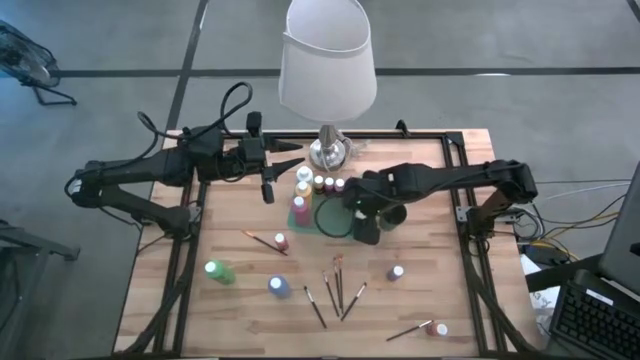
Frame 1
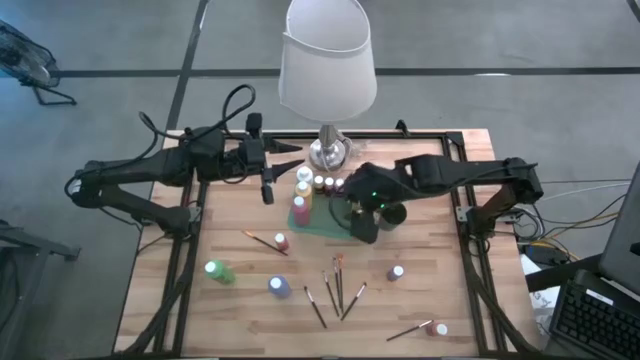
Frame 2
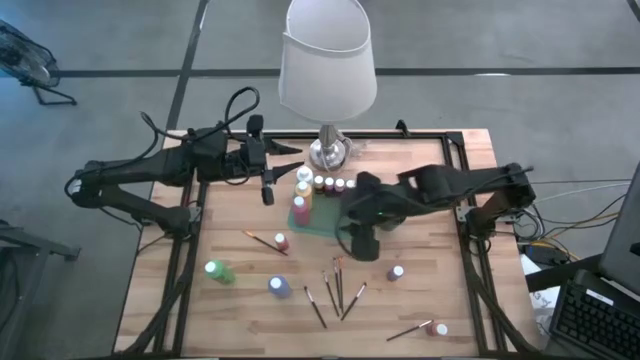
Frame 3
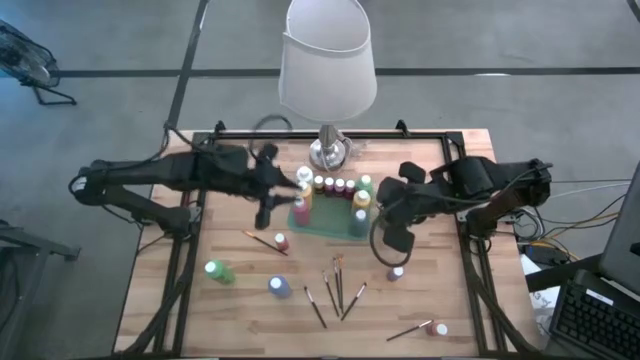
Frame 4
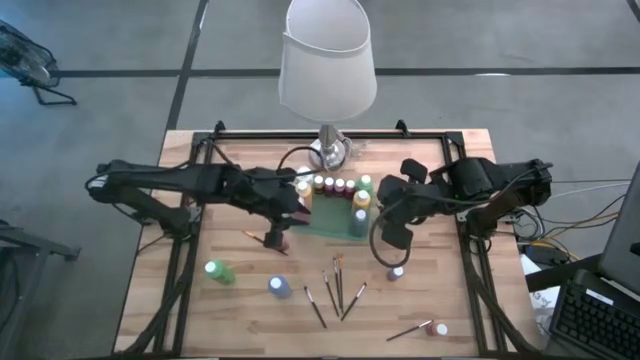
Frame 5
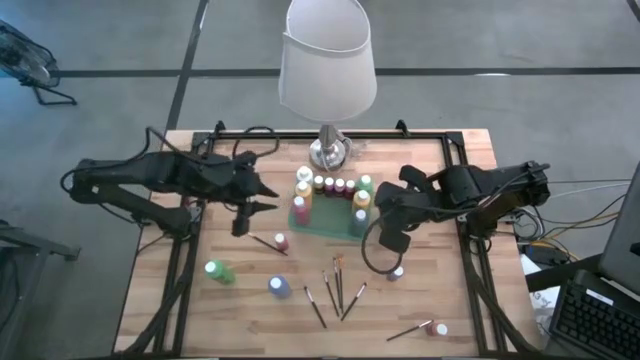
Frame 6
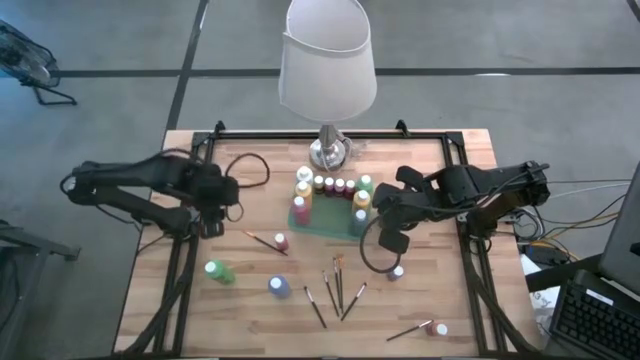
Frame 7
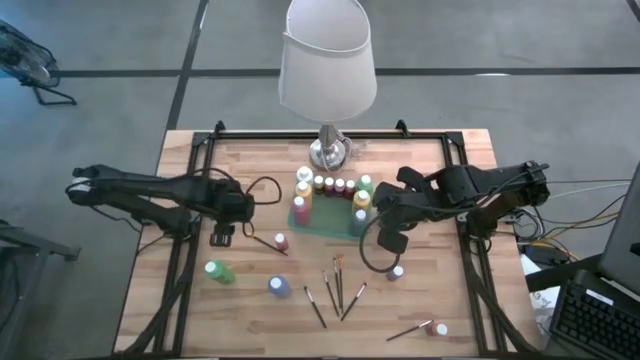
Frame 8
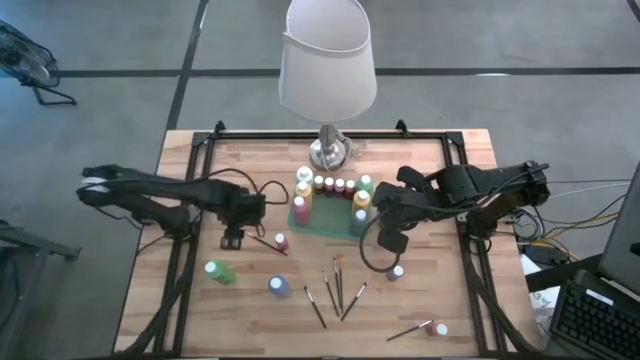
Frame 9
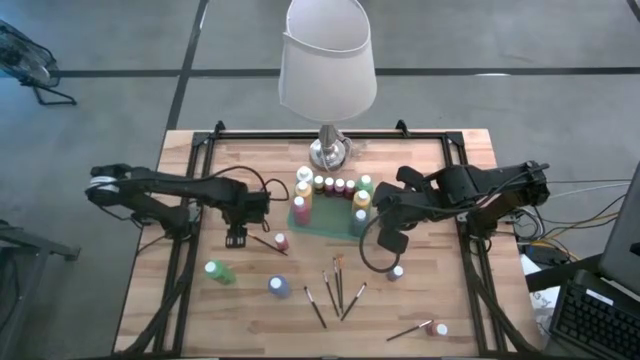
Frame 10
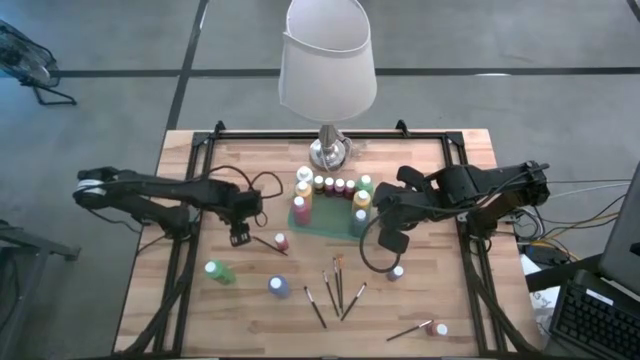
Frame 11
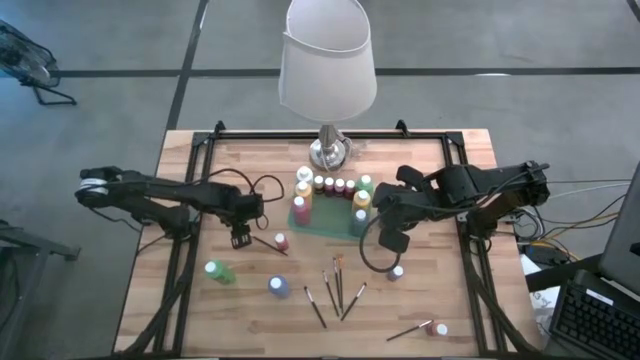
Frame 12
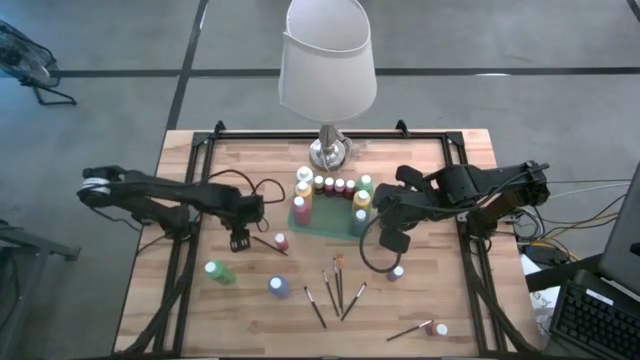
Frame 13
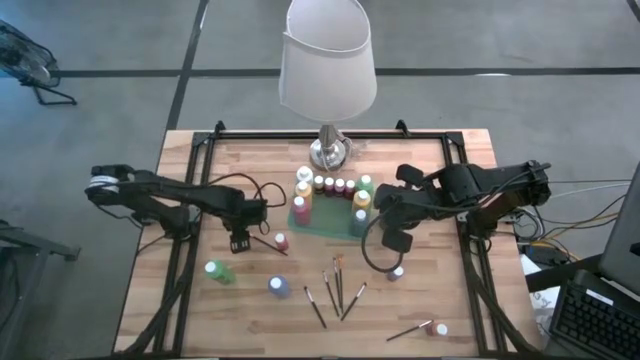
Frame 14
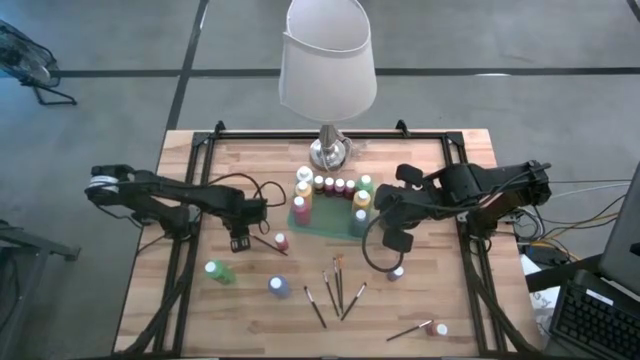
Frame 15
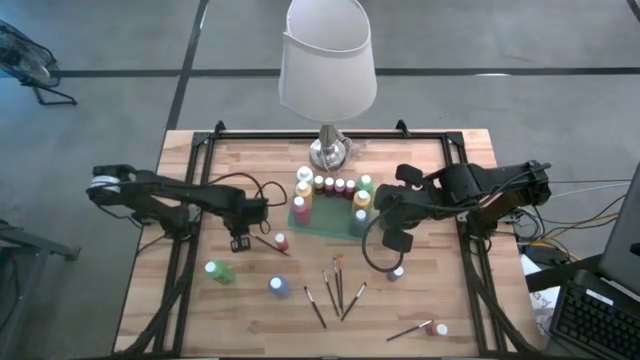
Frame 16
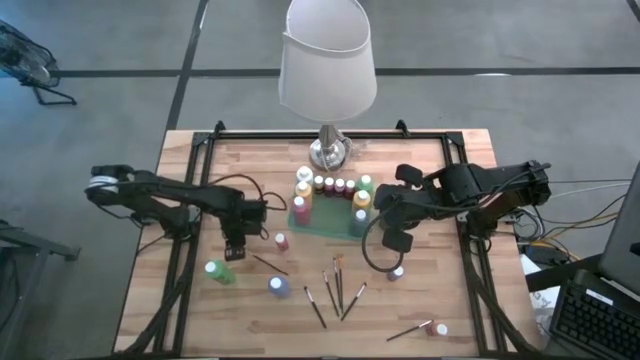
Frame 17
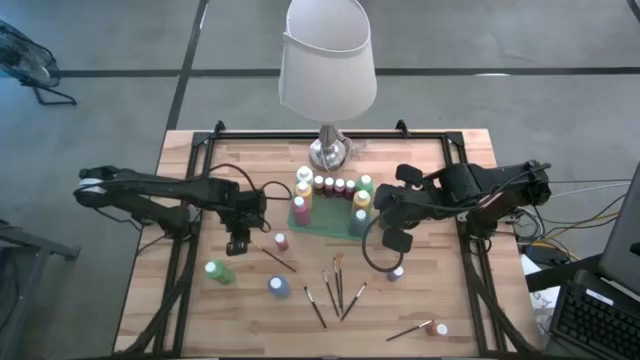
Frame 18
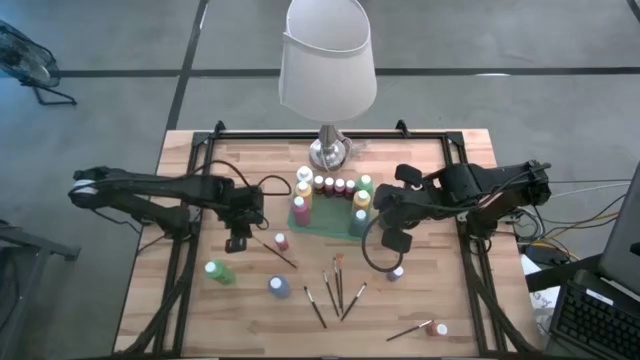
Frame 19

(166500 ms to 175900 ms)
Task: Pick & Place Paint Supplies
Put the orange paint brush into the black cup

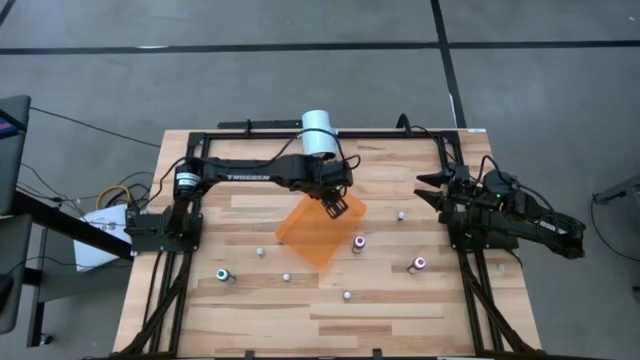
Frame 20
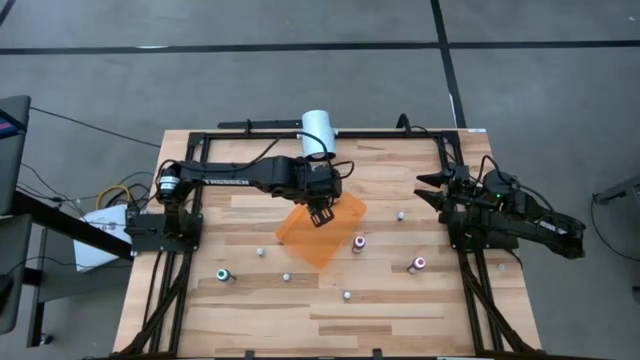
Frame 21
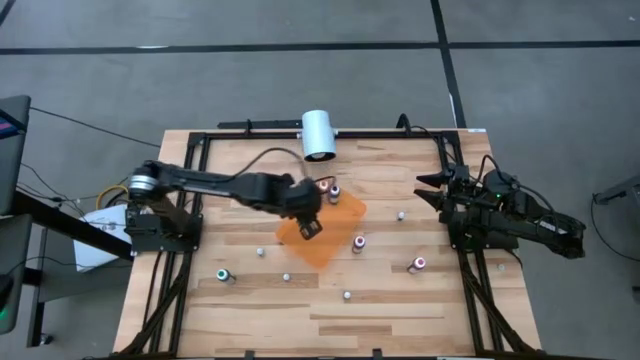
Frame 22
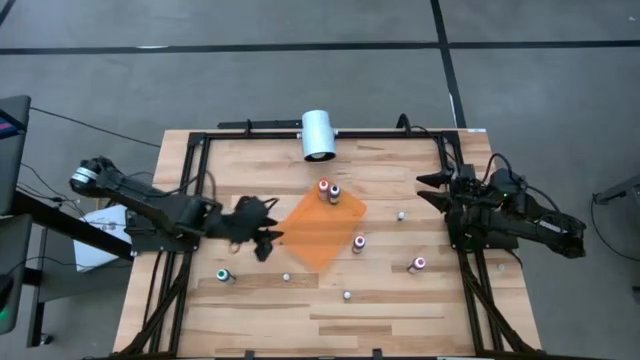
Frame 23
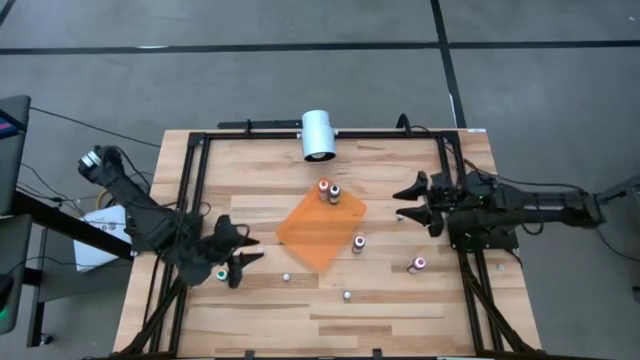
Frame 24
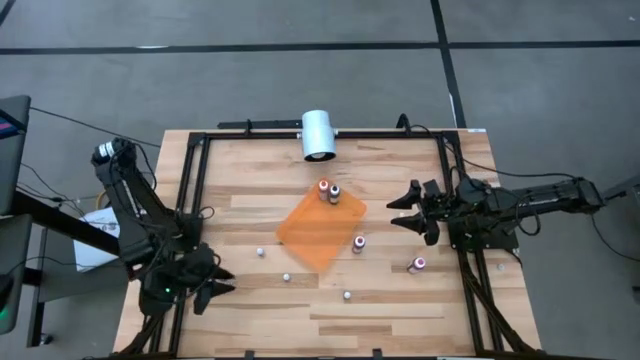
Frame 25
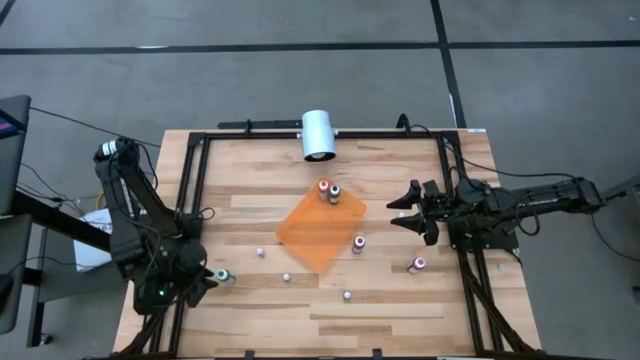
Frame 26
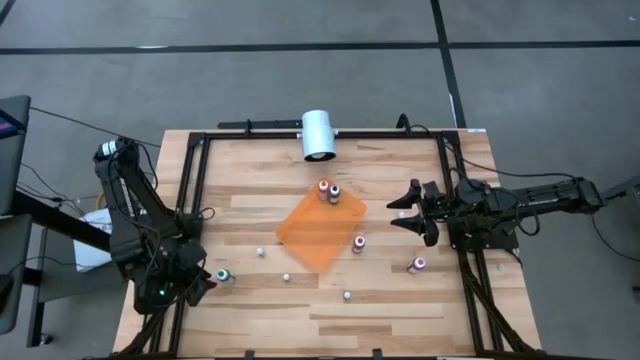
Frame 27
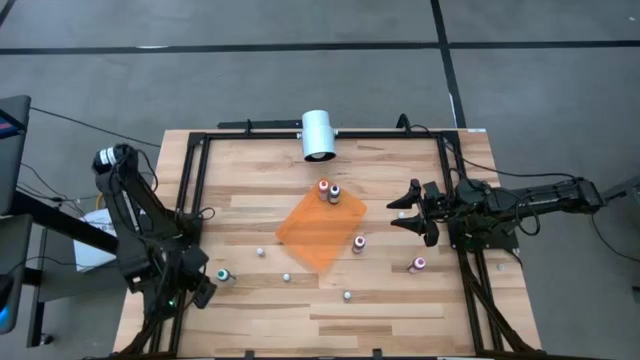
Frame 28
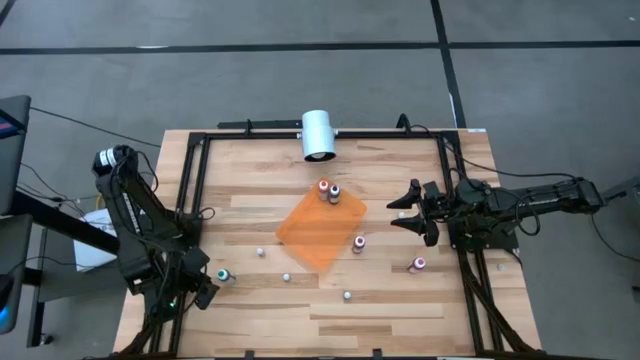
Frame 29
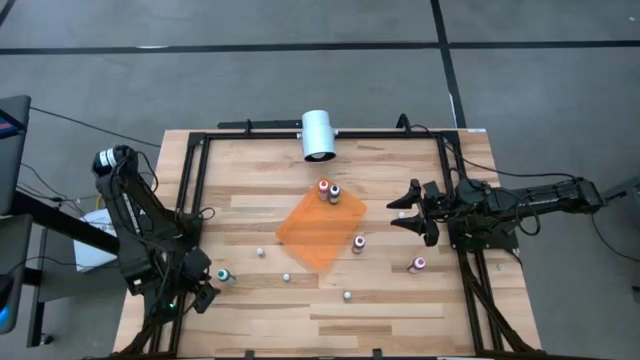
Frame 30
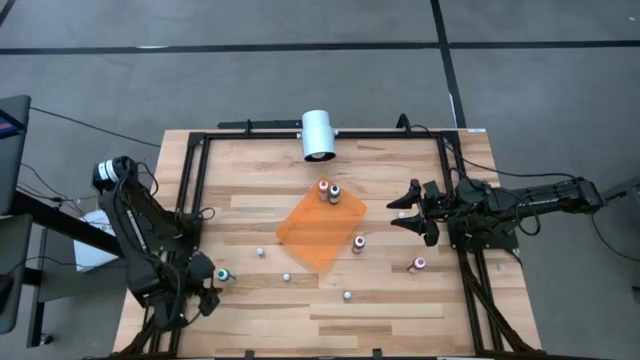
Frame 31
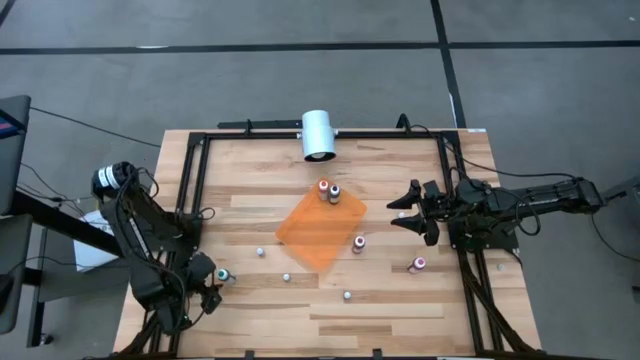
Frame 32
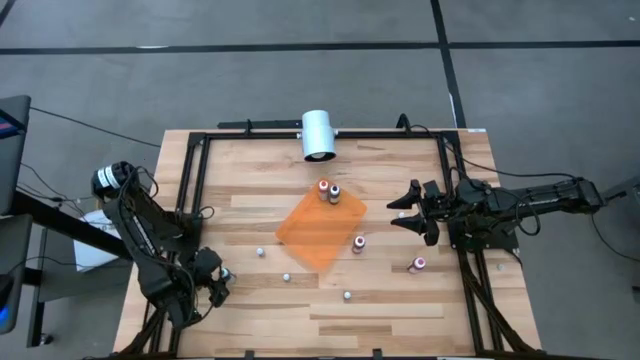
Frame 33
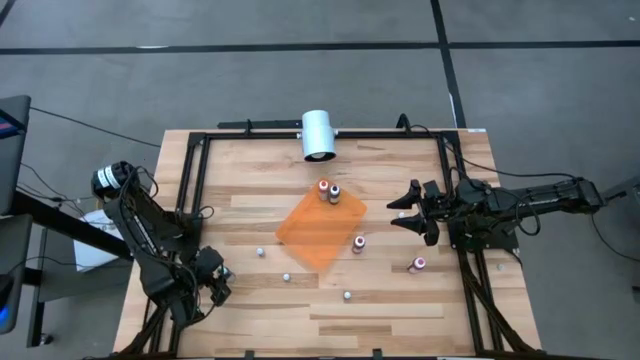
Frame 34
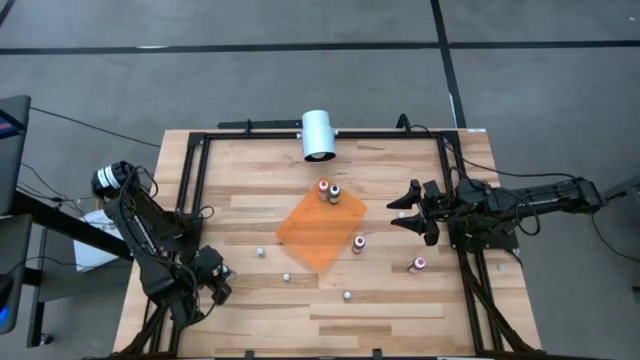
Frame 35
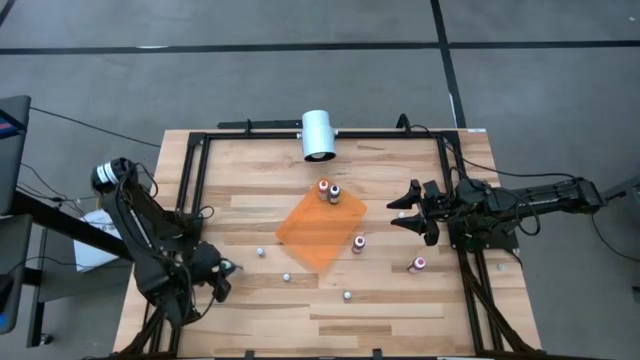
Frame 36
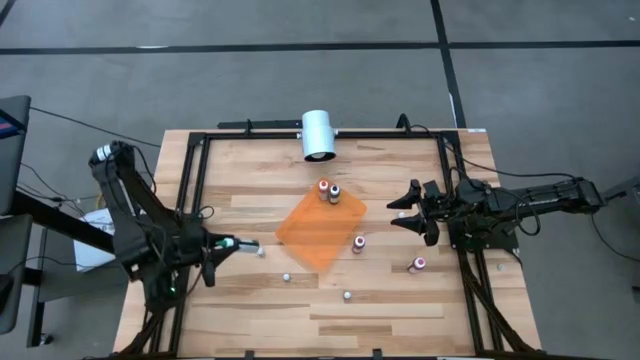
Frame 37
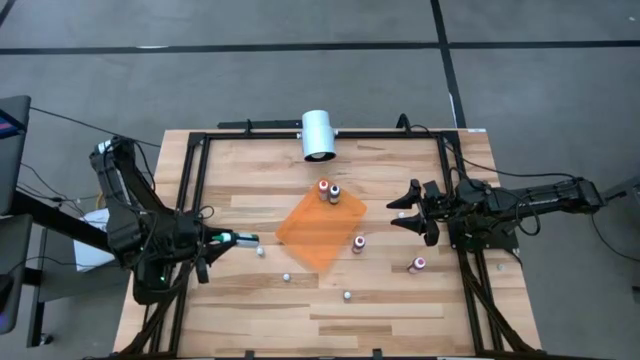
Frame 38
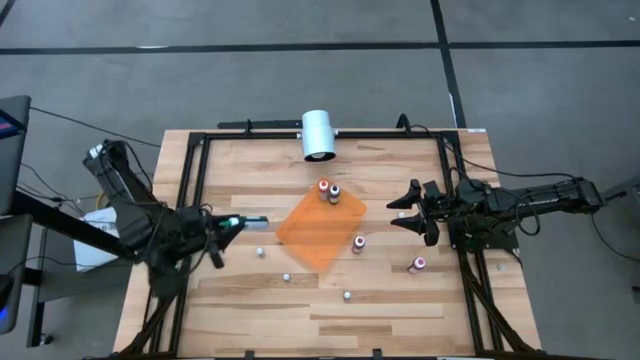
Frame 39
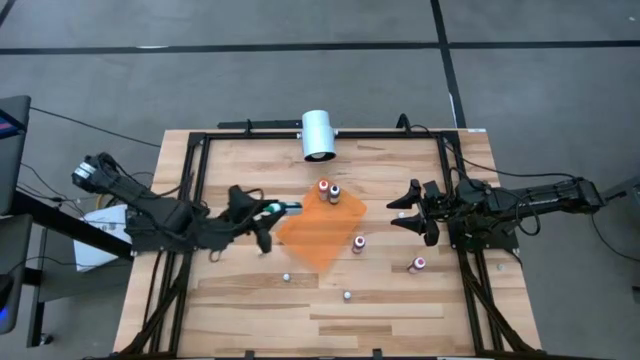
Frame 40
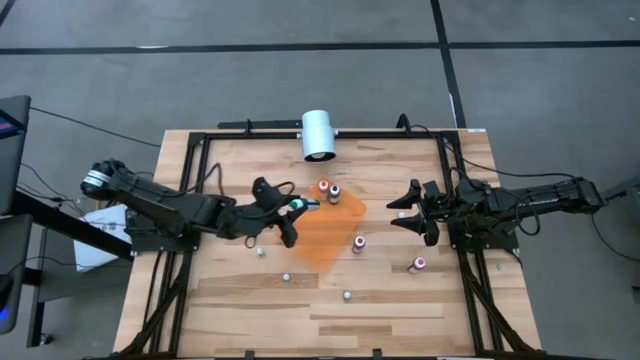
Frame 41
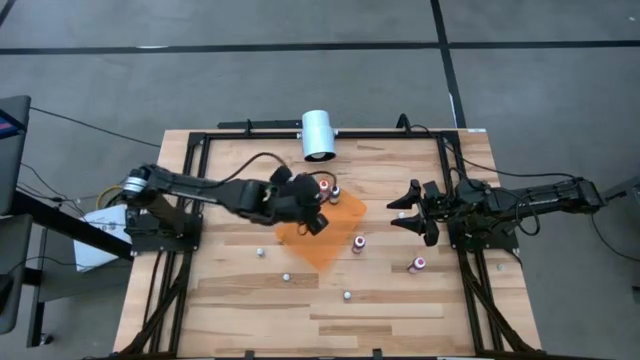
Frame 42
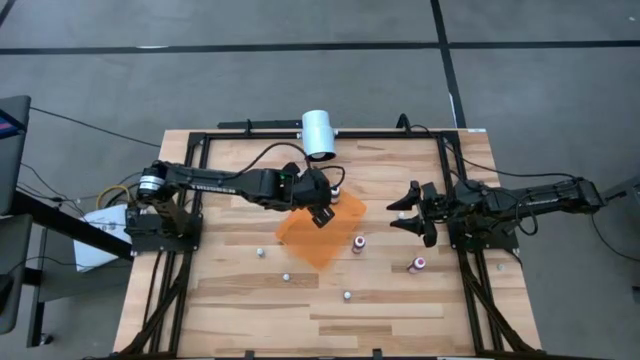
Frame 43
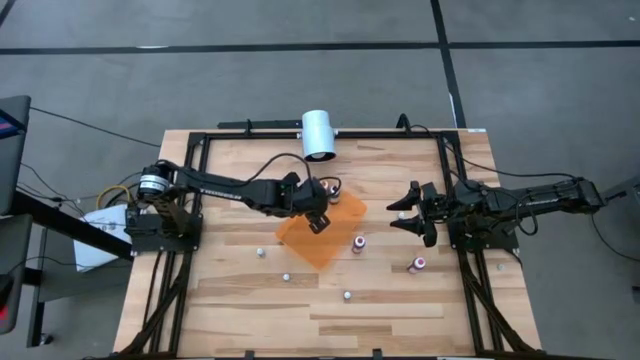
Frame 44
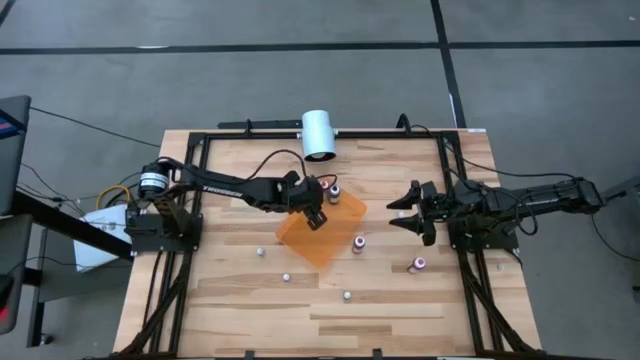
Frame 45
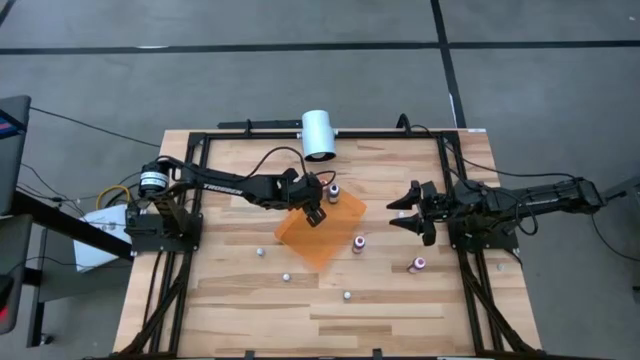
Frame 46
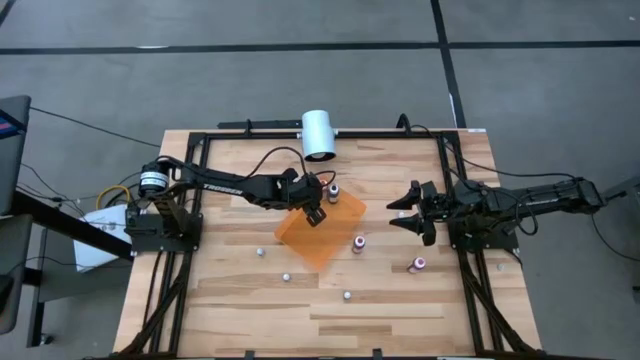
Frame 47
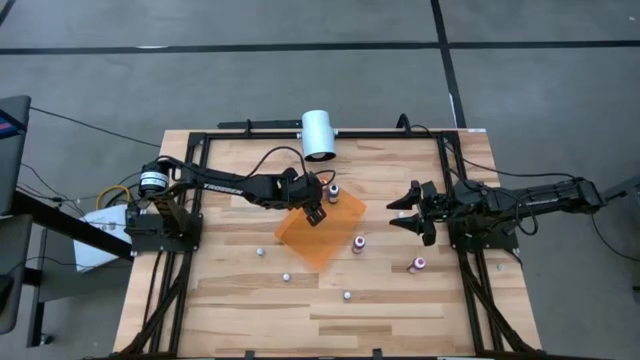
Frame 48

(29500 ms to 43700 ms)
Task: Pick & Place food coloring
Put the big green food coloring bottle into the orange bin
